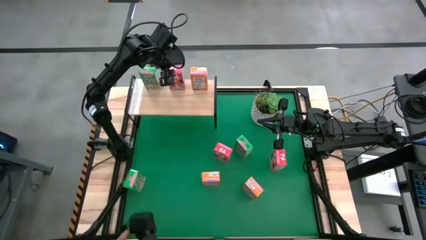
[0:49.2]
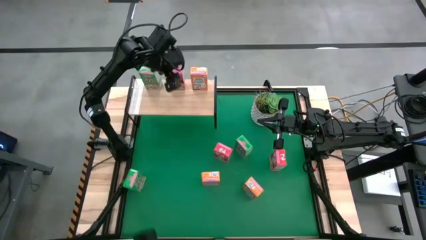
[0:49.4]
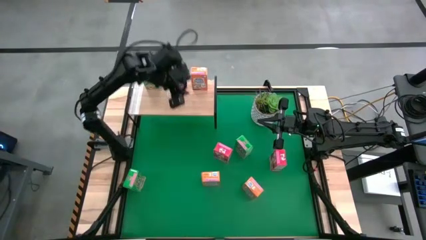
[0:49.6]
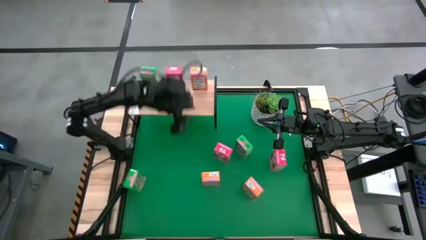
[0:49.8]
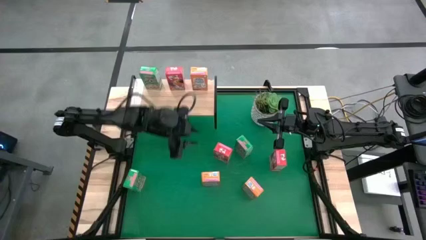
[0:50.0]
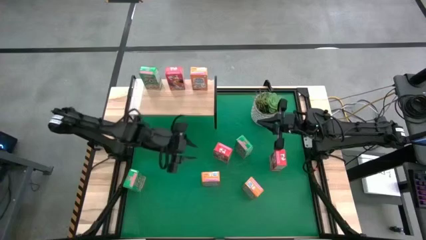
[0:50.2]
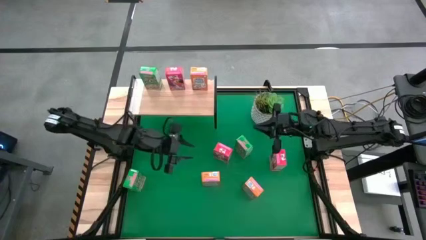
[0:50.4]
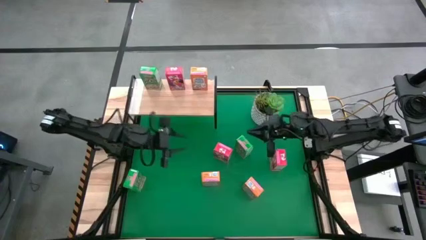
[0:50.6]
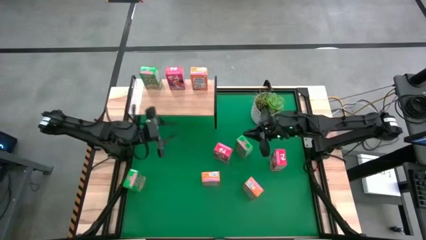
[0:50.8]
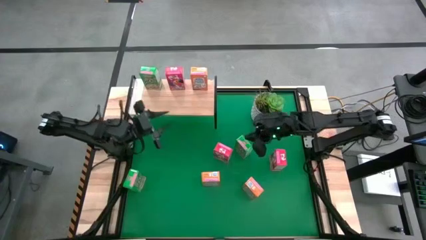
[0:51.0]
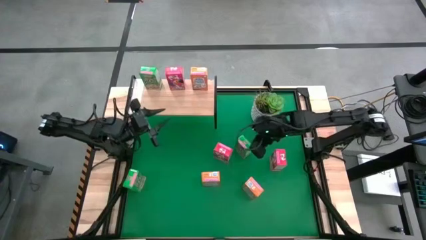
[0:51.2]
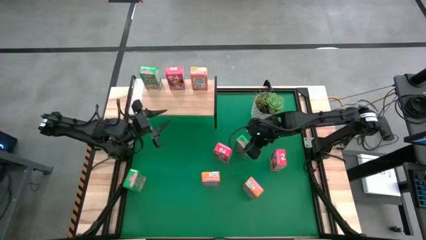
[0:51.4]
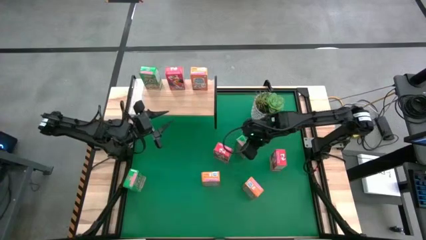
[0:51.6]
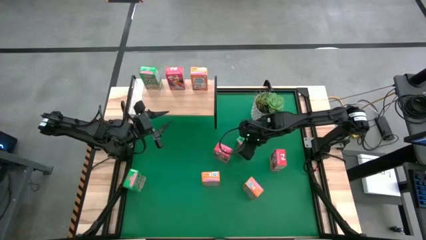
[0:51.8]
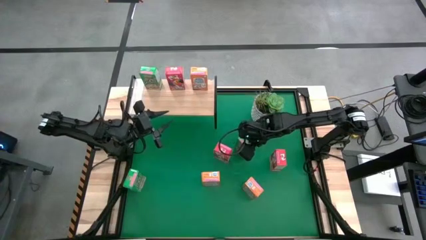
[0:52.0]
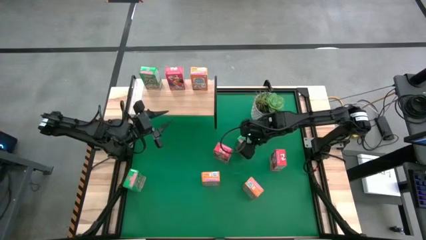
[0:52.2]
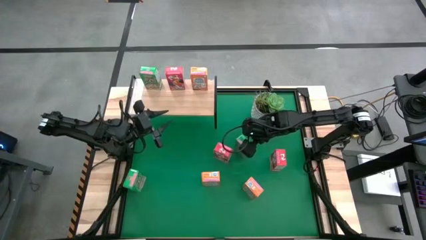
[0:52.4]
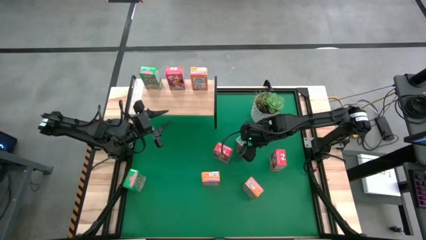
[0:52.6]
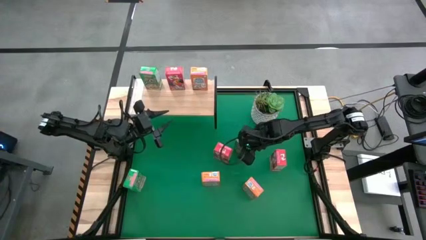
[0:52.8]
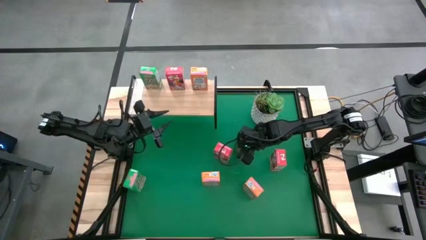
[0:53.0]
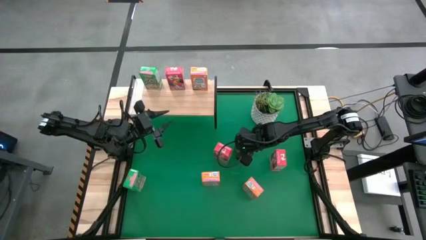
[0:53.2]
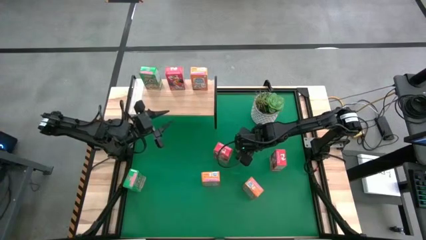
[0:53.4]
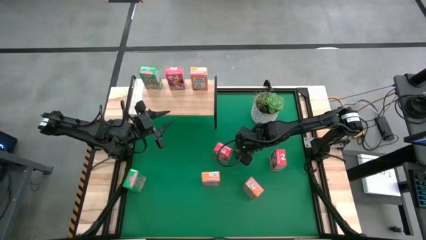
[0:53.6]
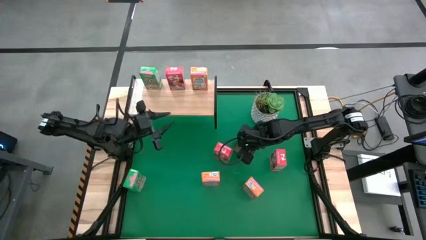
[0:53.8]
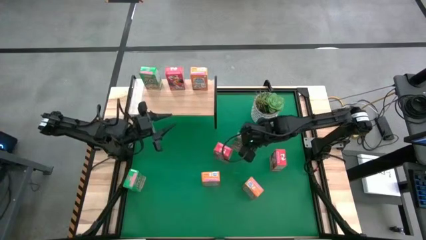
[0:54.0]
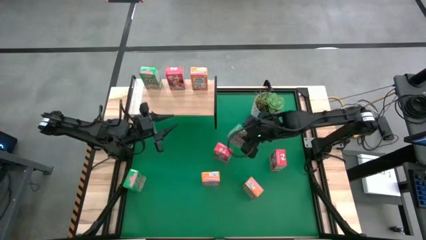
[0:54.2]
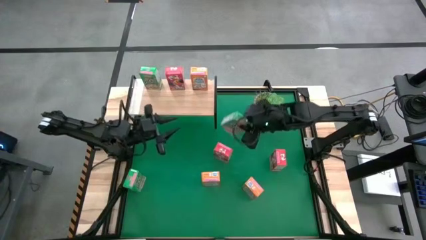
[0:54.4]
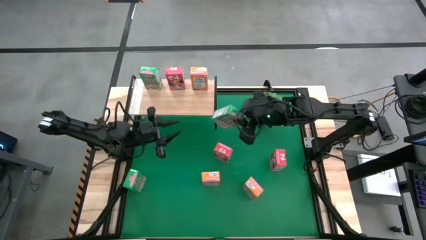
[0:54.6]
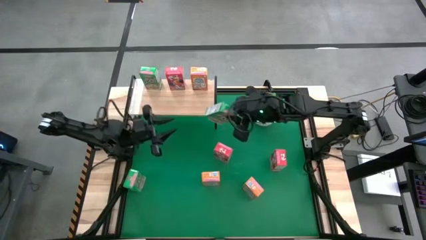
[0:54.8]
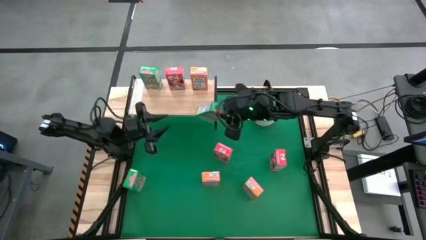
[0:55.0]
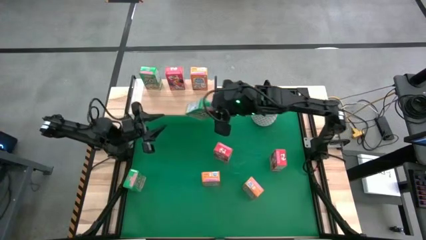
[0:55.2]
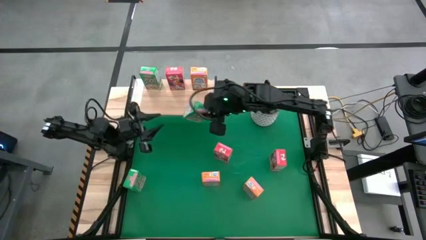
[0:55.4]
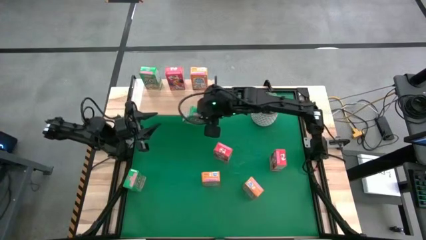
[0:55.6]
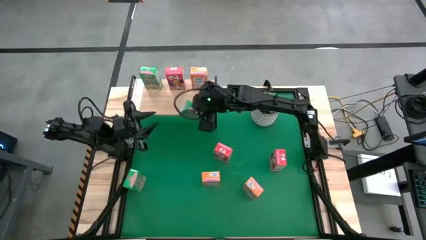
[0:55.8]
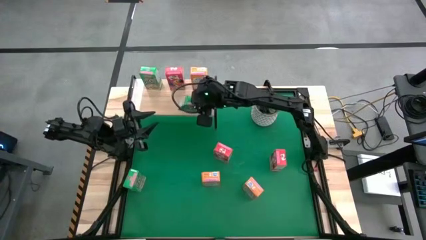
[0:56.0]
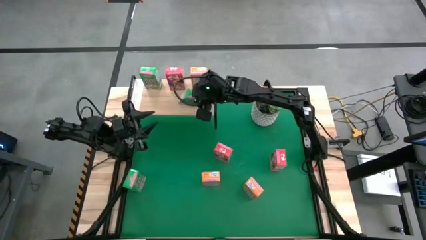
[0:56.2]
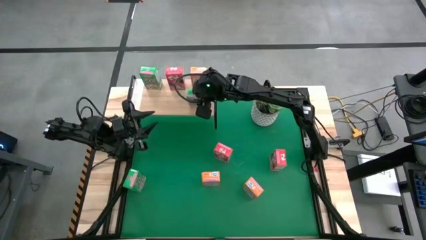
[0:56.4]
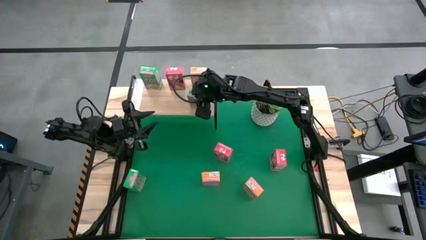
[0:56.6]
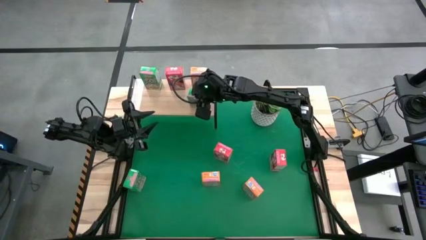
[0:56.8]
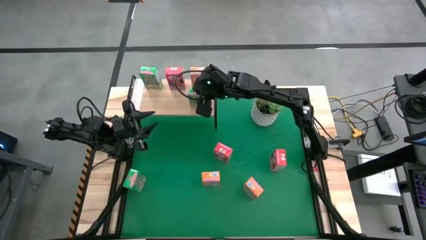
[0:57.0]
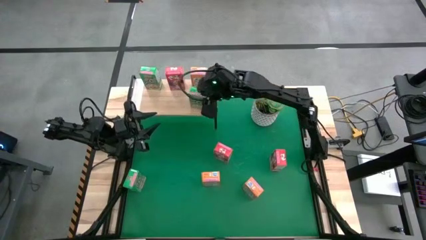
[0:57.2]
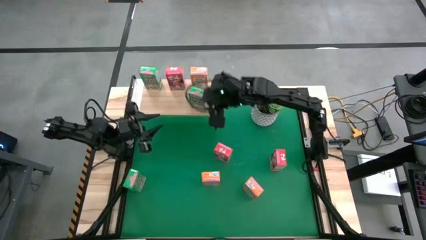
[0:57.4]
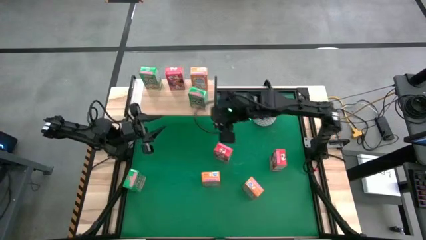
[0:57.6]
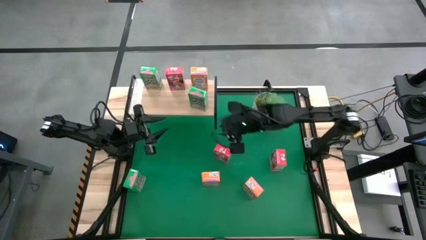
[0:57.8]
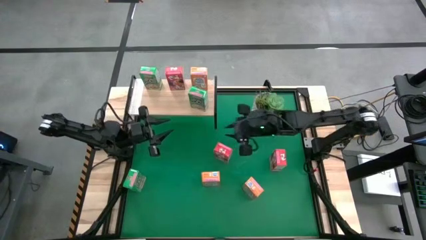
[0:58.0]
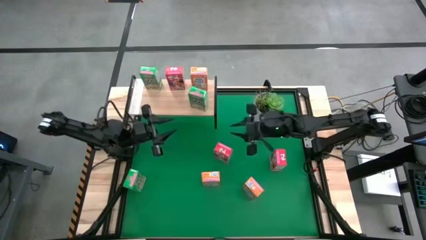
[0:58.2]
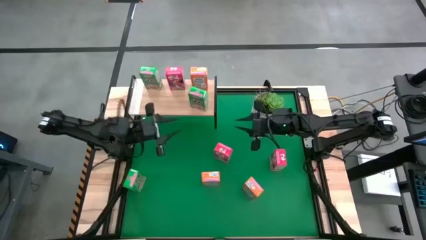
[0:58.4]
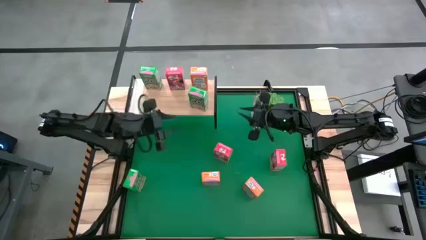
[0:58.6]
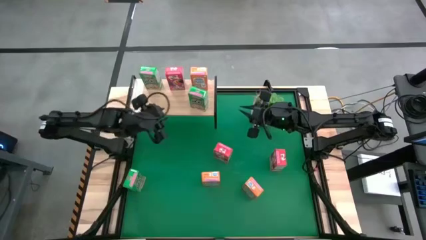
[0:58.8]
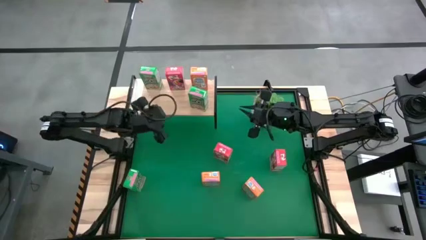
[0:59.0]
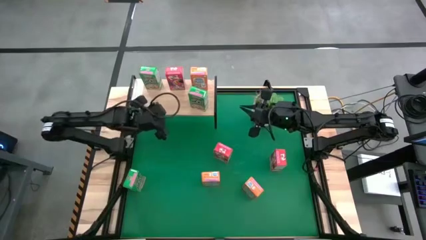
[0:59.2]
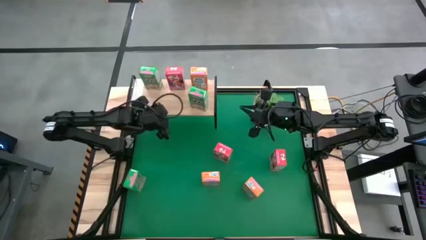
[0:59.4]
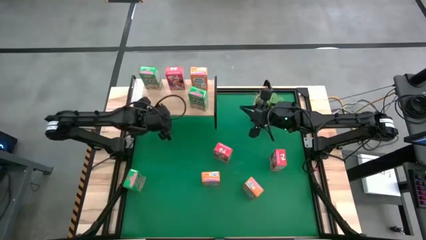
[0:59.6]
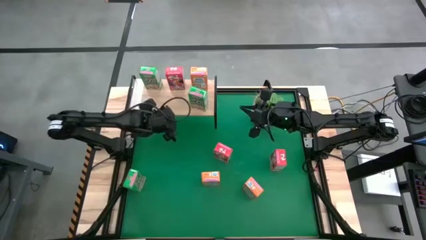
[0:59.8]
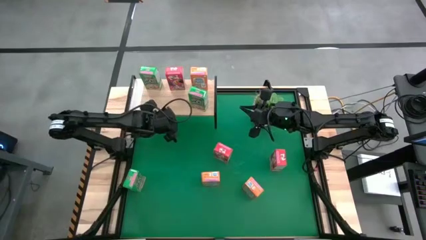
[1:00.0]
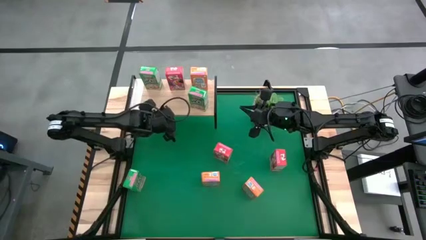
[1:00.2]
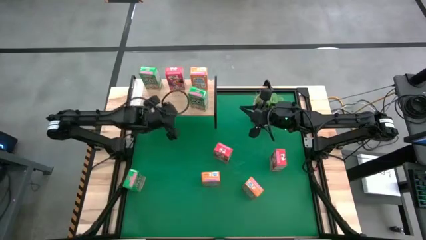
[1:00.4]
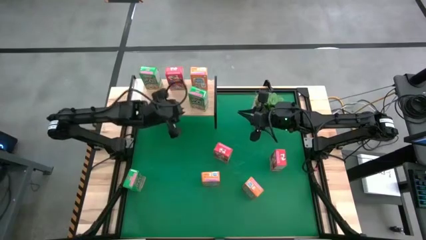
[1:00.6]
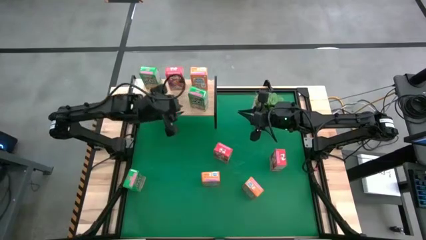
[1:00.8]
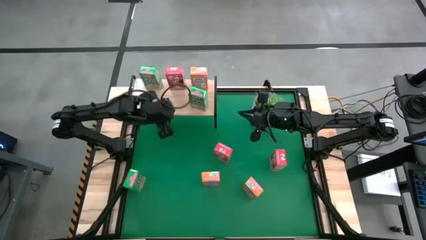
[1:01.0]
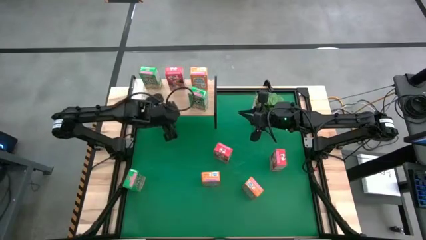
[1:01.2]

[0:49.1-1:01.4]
Task: Stack cereal on shelf
Put the top green cereal box on the shelf aligned with other green cereal box

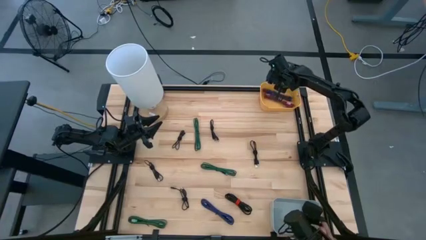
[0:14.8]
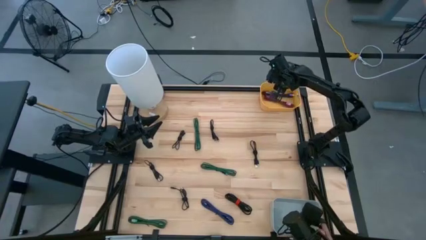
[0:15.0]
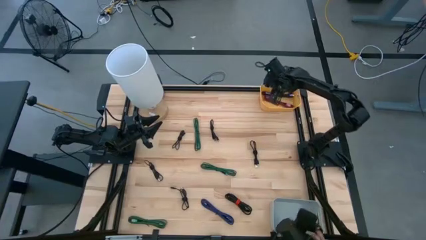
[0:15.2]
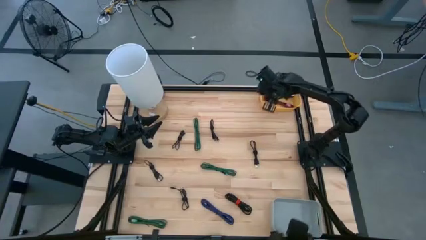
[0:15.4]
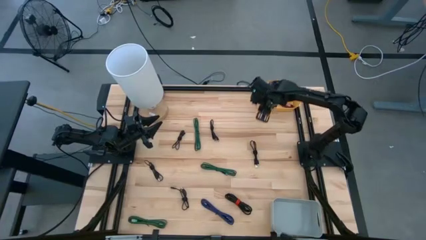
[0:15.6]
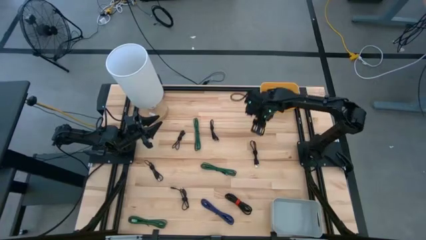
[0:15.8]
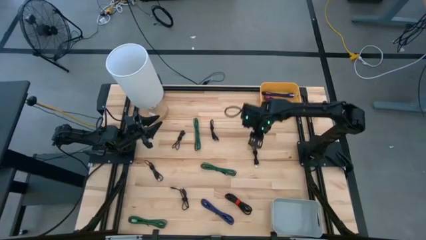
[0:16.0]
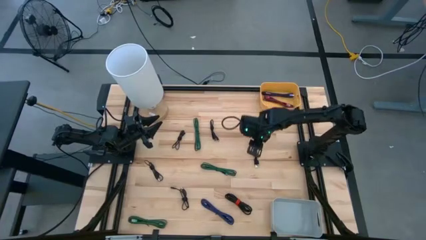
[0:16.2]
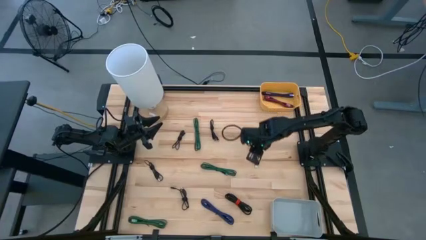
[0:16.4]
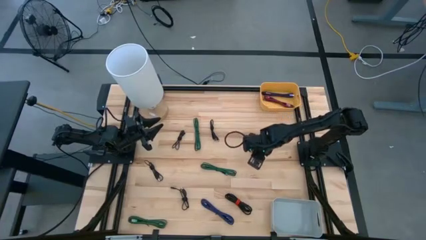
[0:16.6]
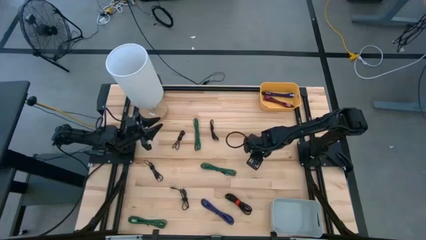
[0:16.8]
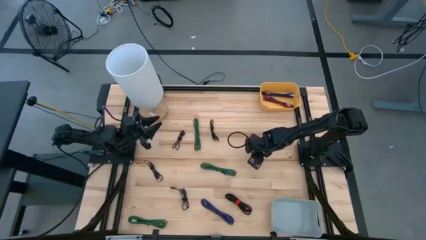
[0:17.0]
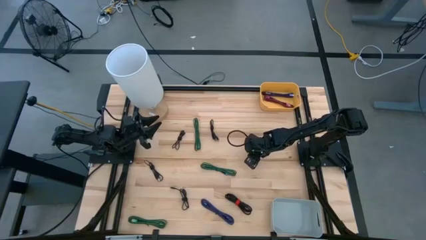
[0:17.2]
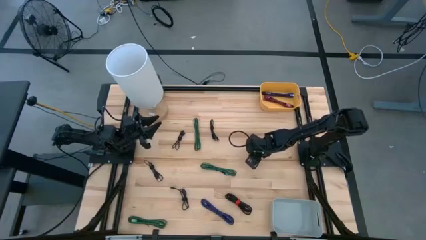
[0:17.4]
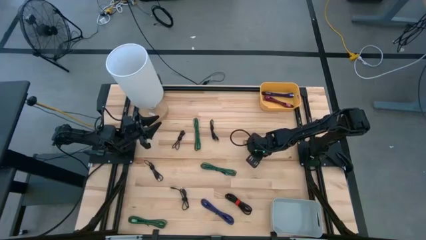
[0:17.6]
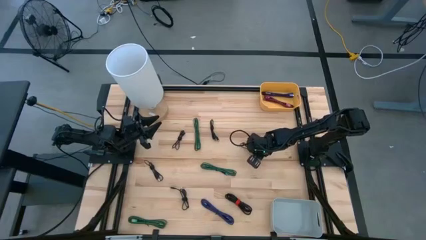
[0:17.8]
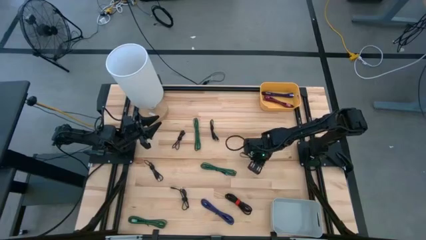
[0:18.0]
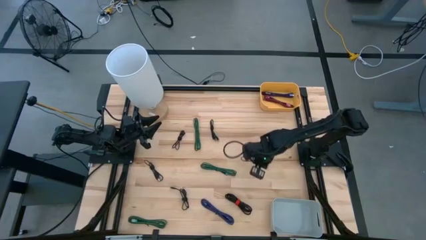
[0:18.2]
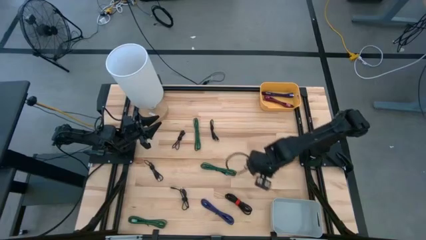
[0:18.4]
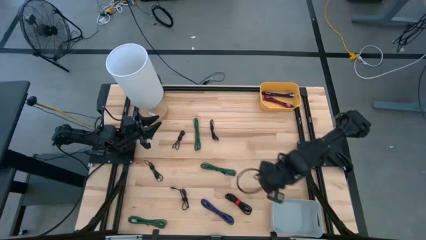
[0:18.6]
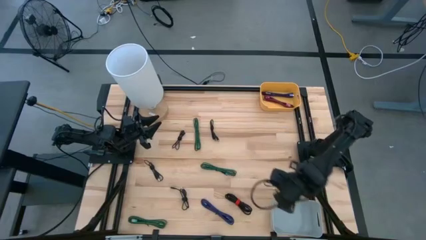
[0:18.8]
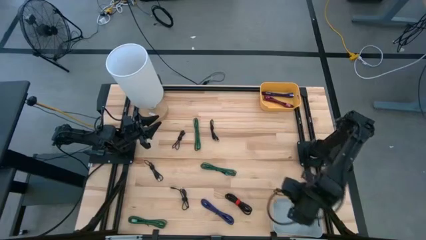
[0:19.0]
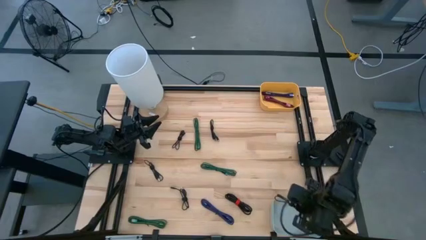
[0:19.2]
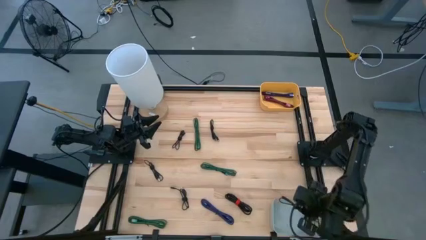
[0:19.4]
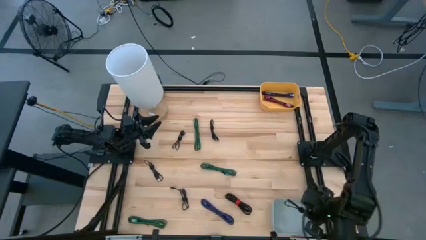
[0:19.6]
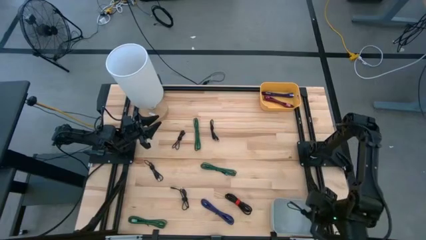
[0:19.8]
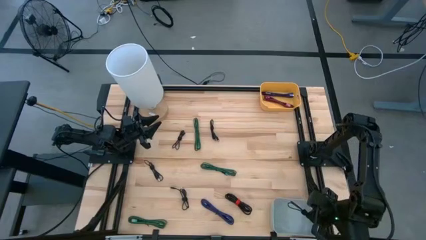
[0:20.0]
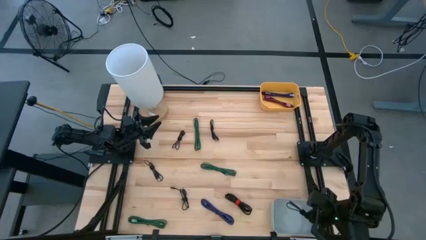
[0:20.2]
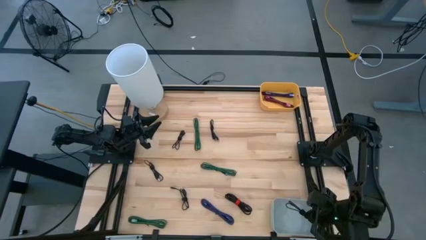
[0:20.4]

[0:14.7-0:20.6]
Task: Pick & Place USB Port
Put the black USB cable into the gray bin
